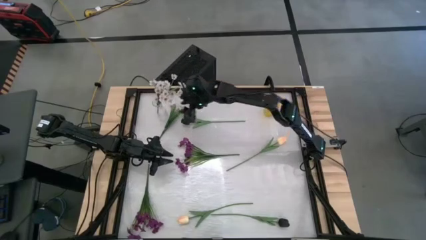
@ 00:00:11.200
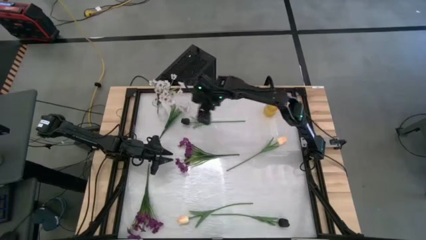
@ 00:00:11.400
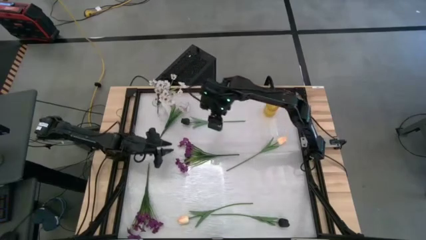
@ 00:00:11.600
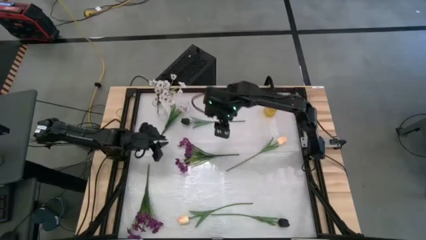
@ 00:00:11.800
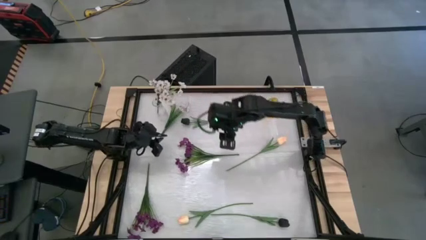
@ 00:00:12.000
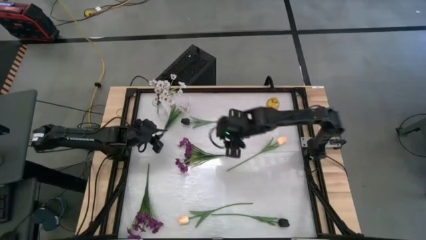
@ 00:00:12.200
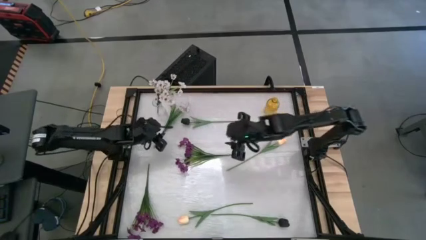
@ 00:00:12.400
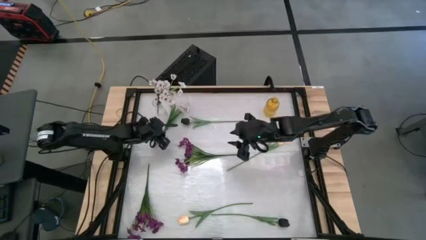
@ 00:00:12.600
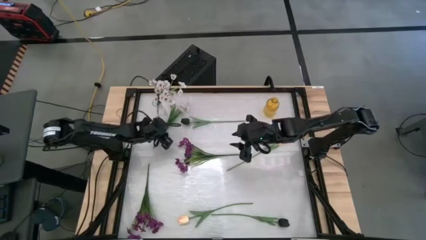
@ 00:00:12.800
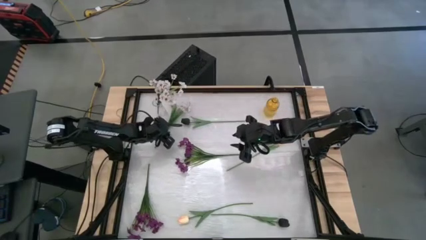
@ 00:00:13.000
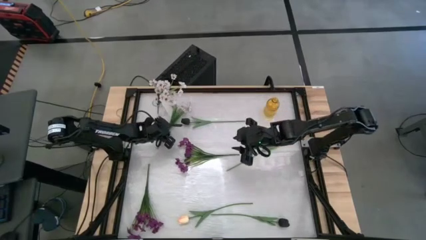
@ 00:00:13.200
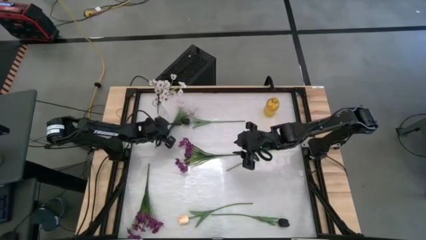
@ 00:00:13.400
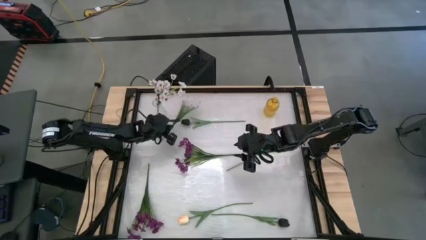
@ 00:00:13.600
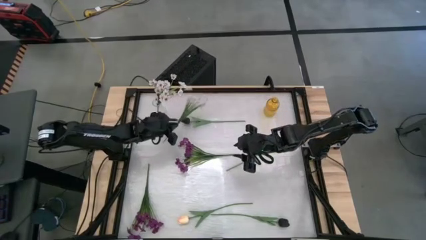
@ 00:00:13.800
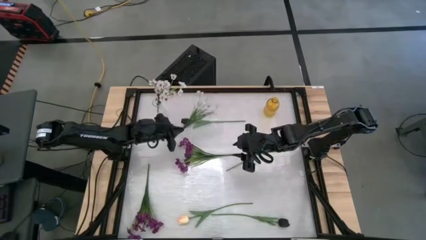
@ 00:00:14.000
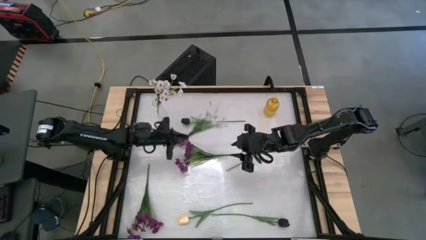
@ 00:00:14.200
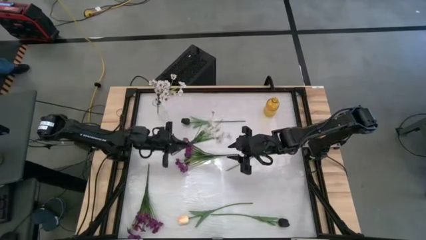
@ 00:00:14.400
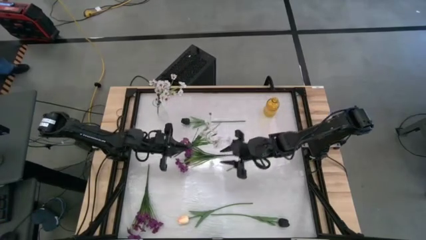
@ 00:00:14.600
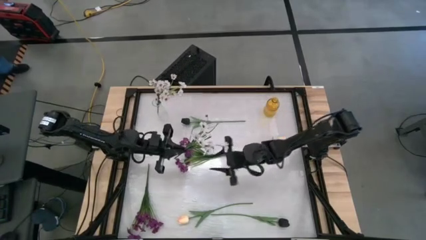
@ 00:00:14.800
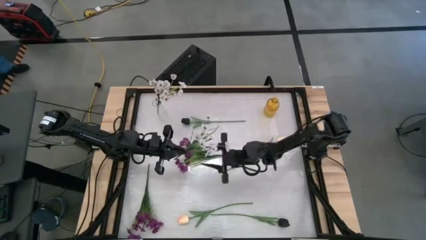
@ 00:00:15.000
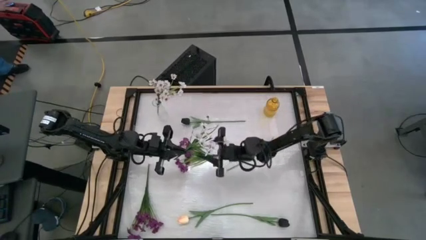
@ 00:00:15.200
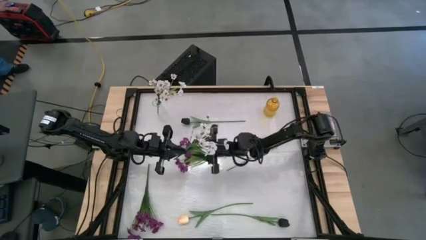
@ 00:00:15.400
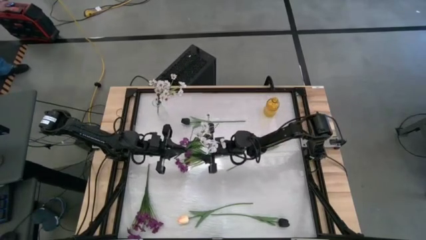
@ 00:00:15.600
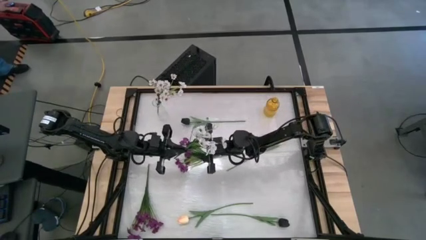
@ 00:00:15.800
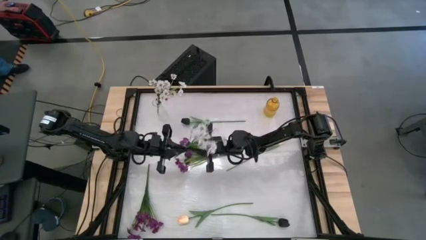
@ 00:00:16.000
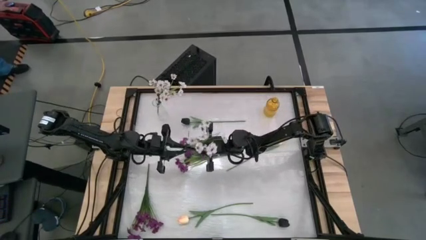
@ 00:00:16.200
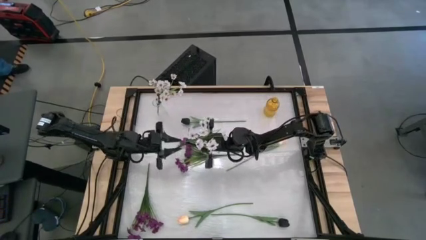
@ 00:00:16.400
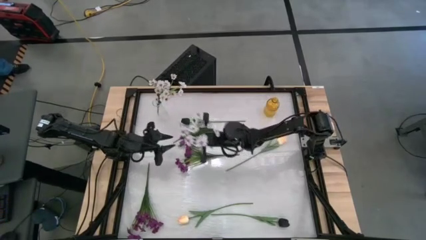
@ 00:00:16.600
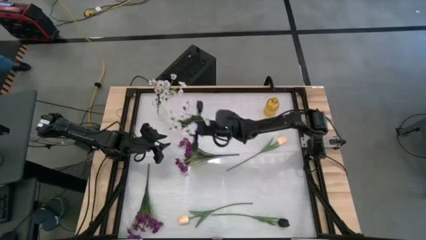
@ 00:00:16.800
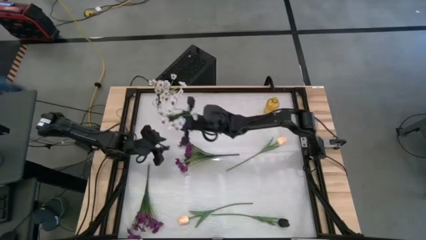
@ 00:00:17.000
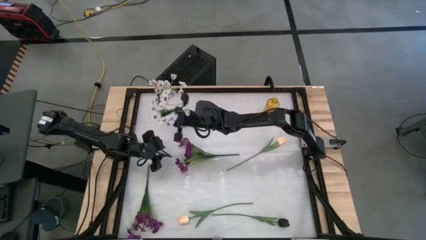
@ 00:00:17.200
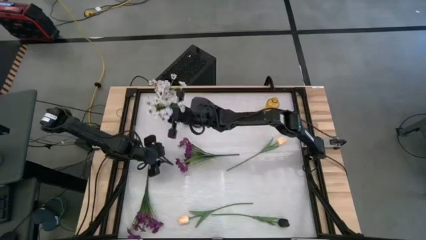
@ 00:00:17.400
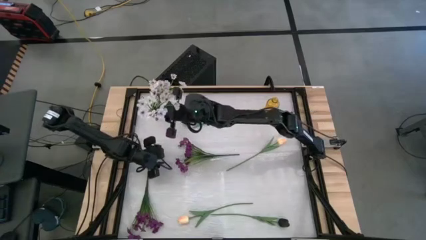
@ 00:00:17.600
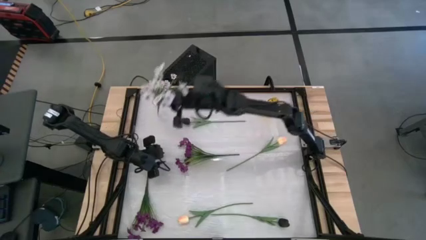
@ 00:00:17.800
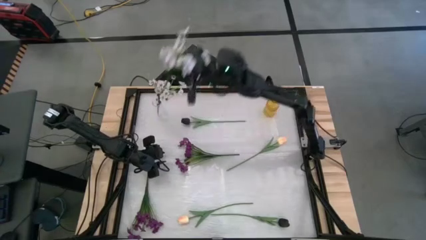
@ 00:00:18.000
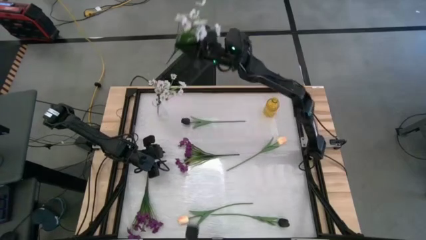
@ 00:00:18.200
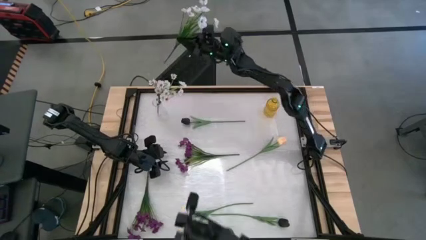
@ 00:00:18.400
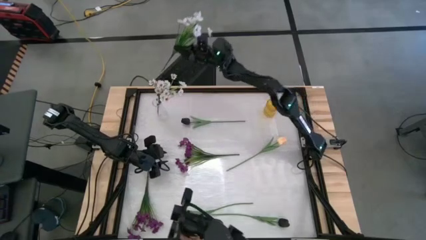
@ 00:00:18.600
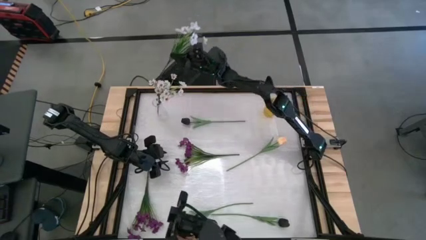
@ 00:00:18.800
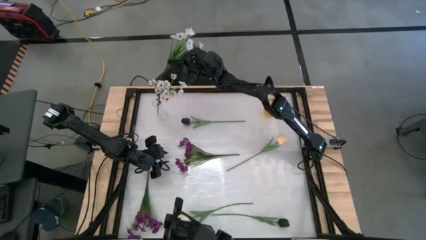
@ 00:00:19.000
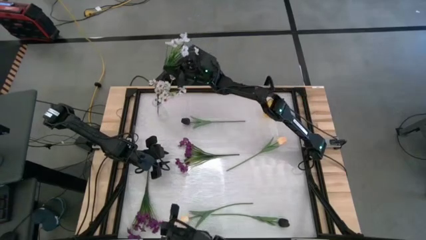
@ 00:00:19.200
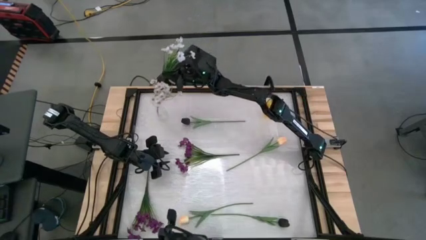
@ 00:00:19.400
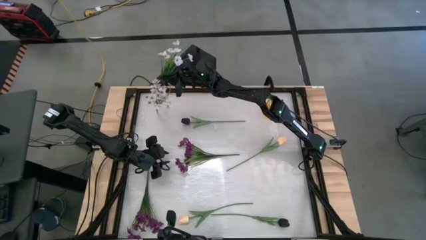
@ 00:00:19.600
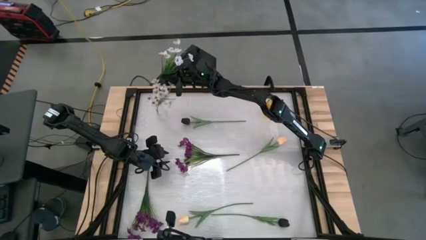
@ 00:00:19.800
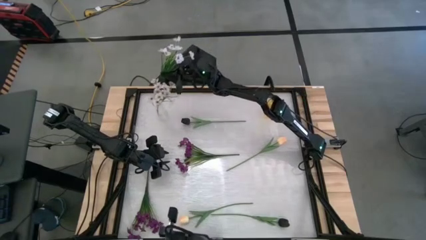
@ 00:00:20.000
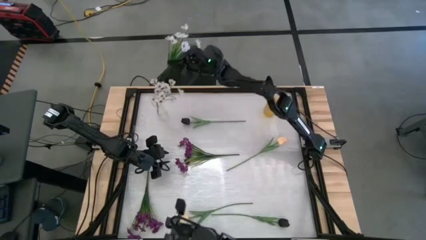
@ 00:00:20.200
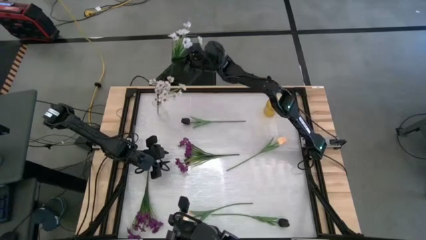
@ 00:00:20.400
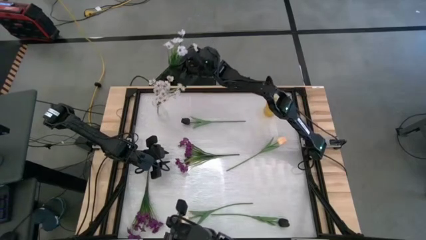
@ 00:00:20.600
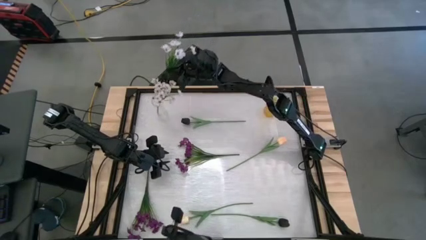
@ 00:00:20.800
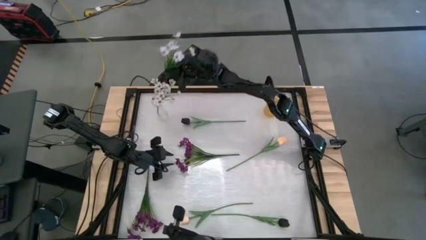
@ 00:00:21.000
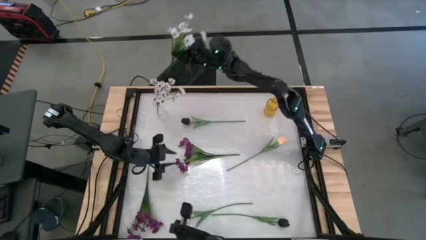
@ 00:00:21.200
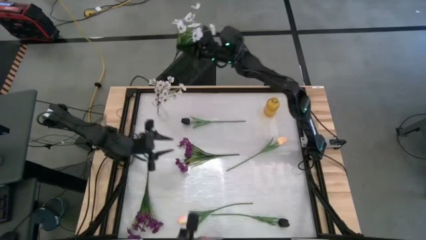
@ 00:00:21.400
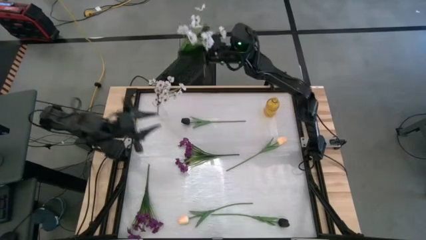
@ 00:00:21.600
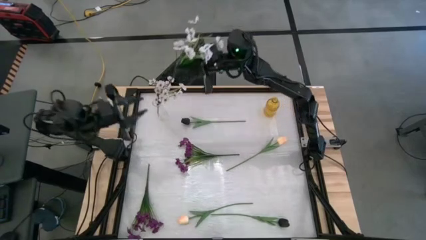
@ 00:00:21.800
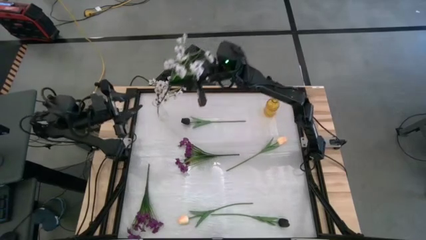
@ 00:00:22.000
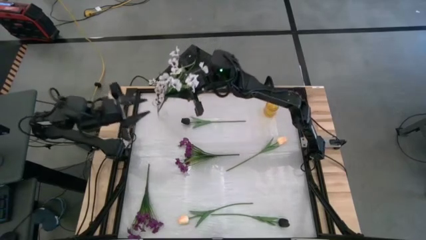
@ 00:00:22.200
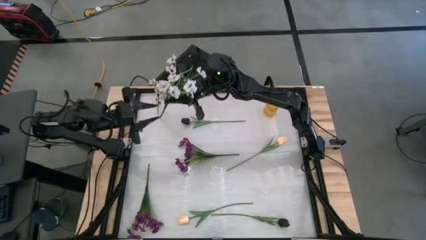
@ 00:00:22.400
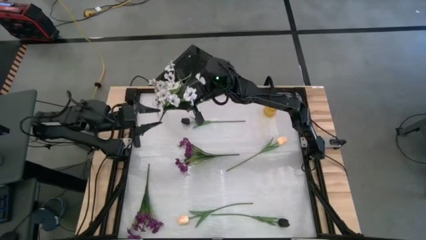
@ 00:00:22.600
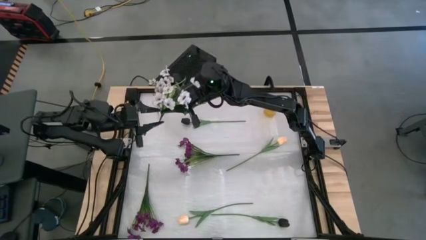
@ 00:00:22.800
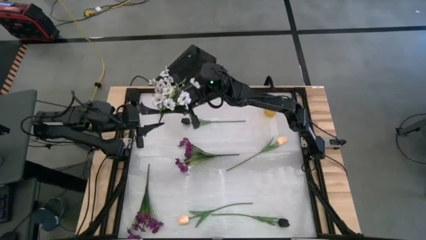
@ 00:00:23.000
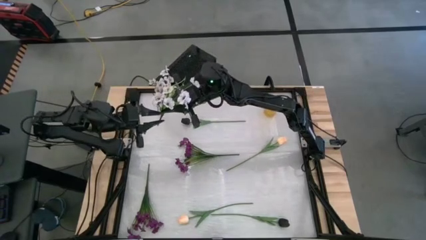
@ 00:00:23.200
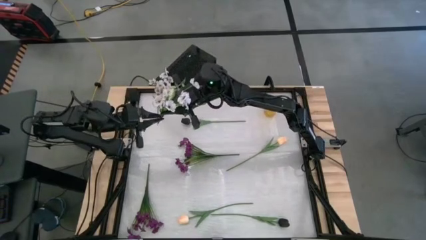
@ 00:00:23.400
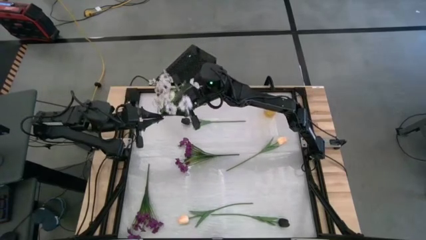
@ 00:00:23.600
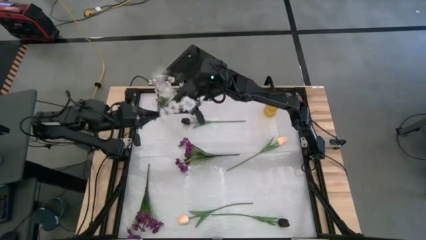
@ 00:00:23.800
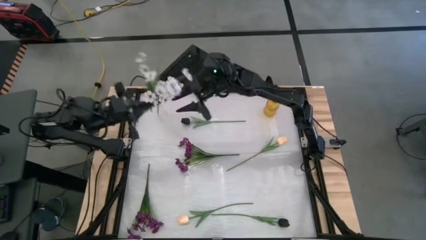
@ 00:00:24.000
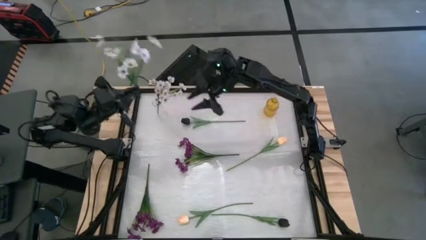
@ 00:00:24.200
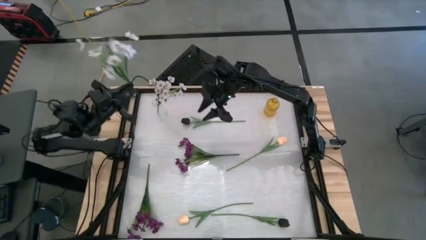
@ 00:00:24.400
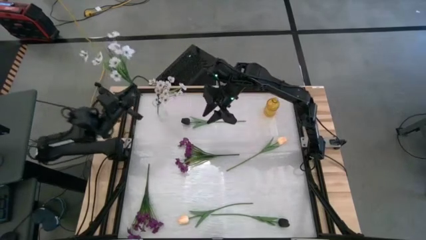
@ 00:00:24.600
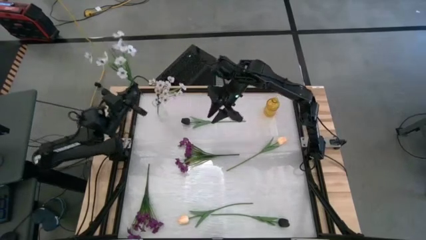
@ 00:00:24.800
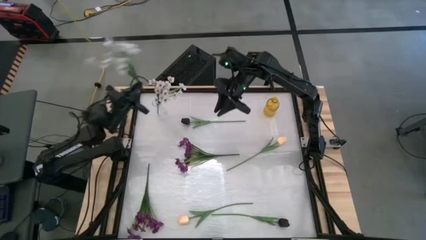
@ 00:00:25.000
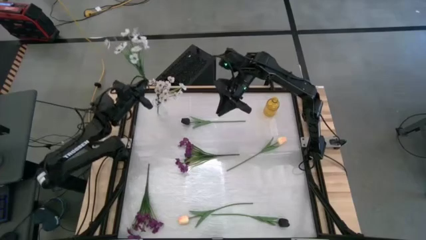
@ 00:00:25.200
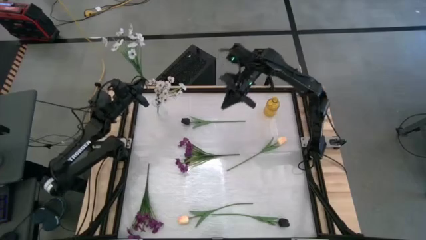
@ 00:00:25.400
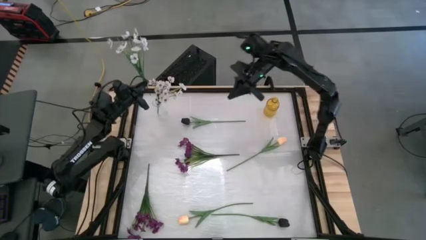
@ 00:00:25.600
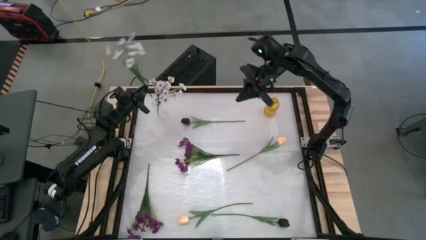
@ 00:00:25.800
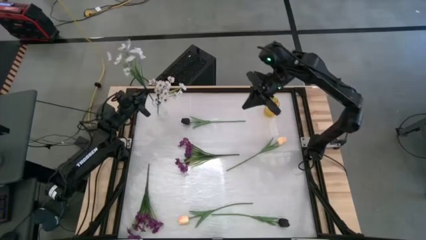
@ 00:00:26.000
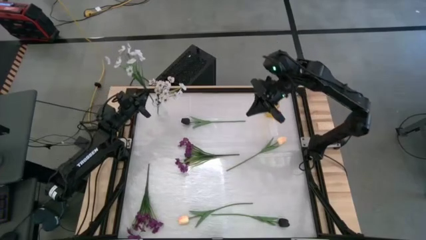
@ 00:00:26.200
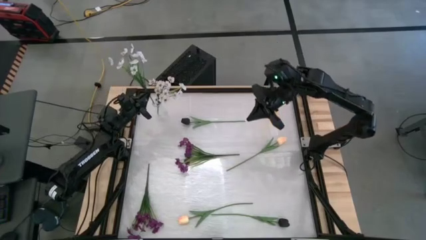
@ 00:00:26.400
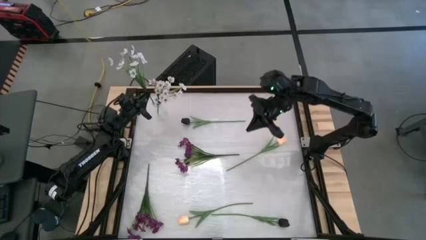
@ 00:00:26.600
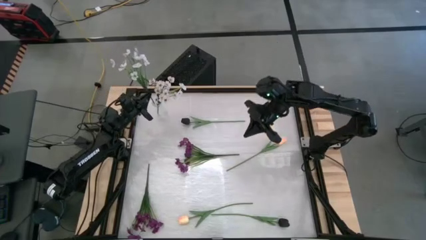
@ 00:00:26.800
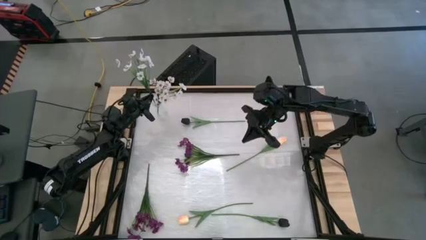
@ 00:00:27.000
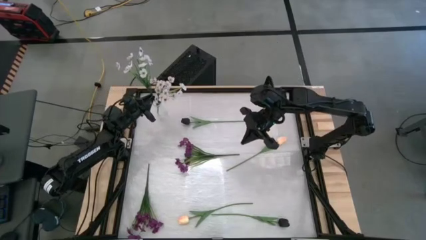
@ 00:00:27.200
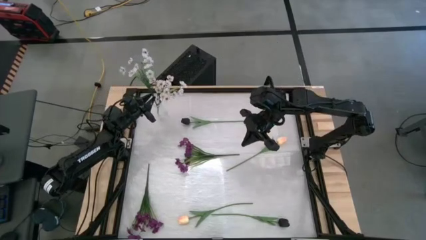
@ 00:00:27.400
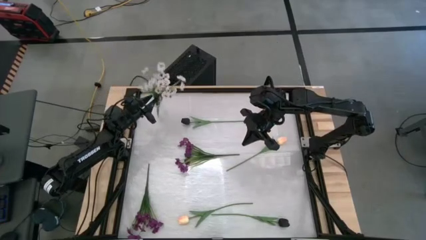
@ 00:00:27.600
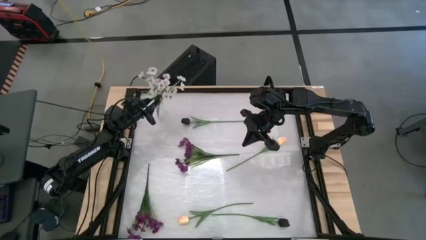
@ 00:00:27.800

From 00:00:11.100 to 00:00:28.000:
Task: Sort flowers into vase by color
Put the white flowers into the transparent vase
